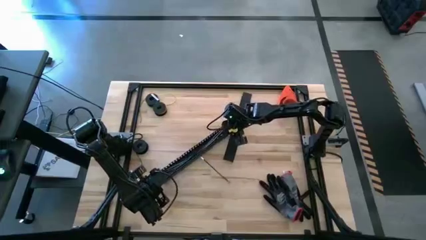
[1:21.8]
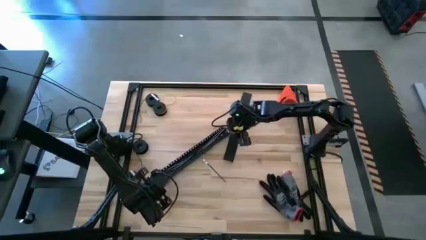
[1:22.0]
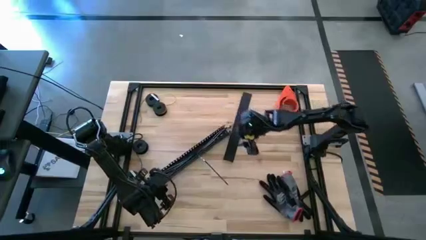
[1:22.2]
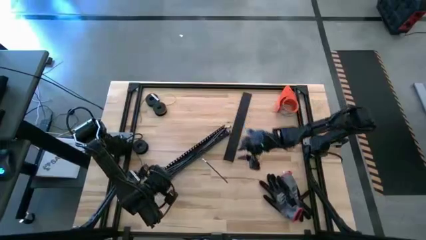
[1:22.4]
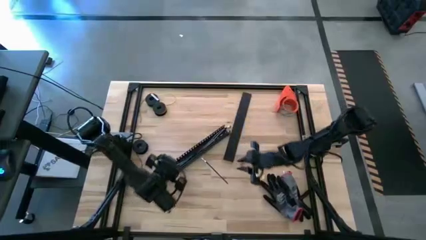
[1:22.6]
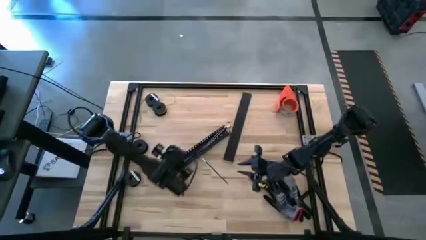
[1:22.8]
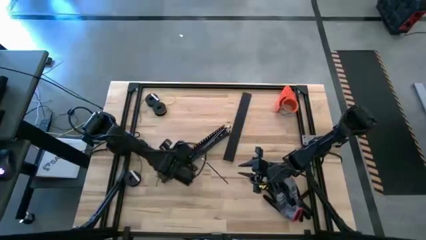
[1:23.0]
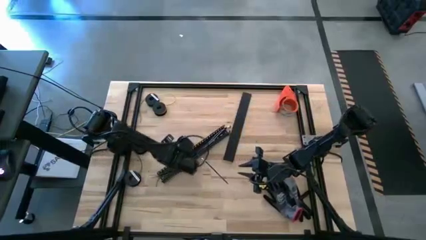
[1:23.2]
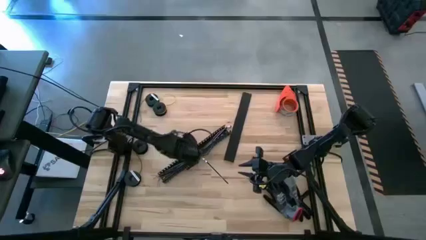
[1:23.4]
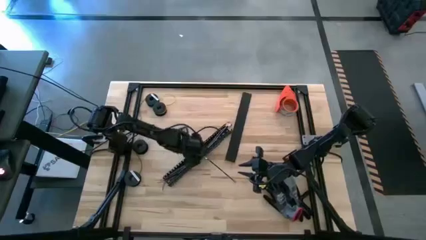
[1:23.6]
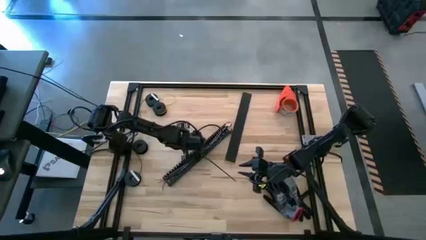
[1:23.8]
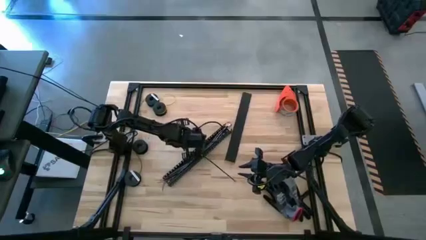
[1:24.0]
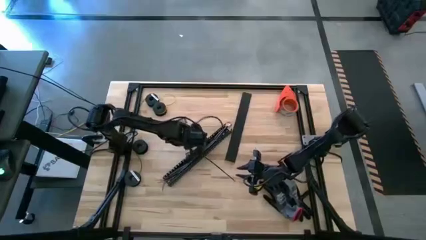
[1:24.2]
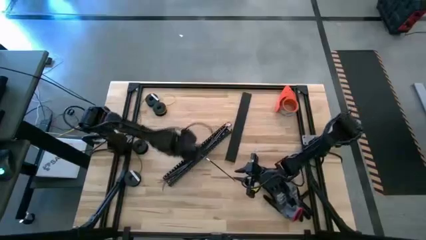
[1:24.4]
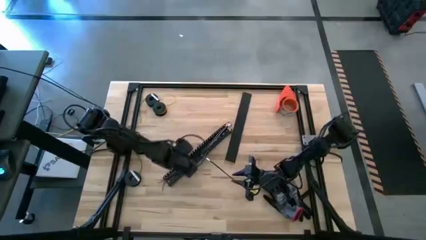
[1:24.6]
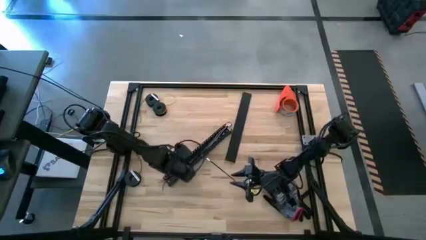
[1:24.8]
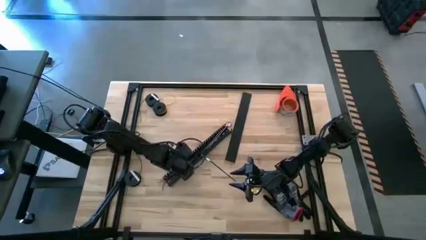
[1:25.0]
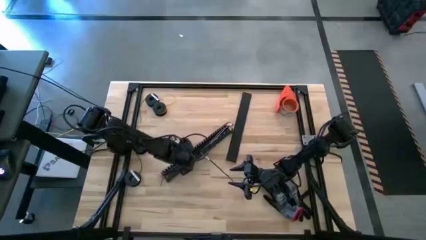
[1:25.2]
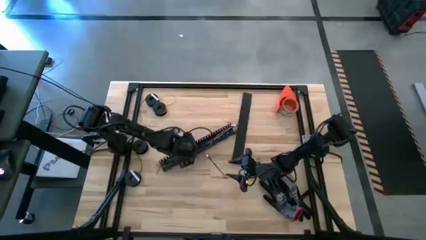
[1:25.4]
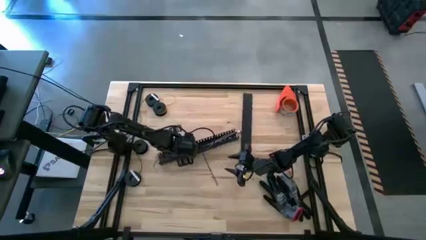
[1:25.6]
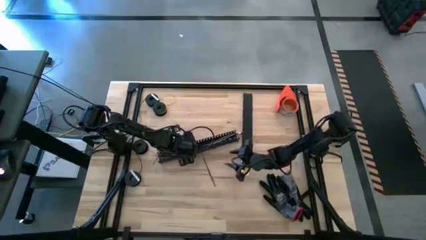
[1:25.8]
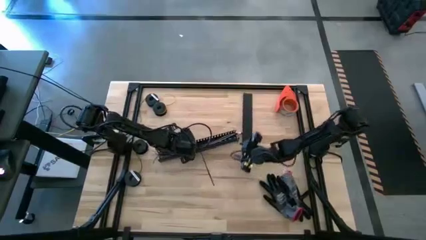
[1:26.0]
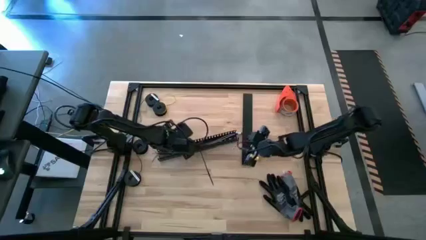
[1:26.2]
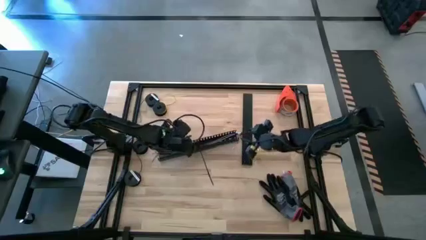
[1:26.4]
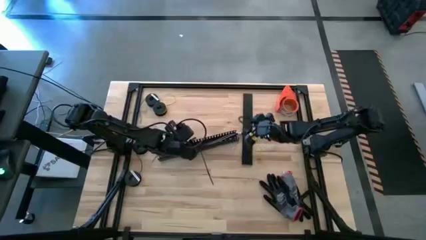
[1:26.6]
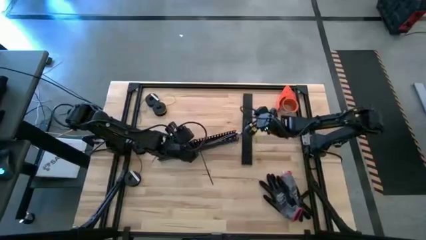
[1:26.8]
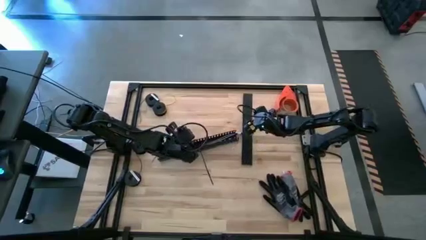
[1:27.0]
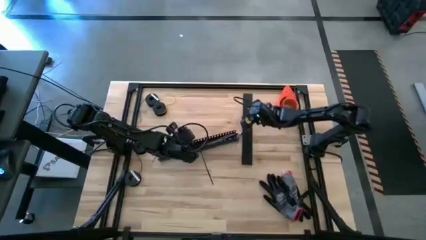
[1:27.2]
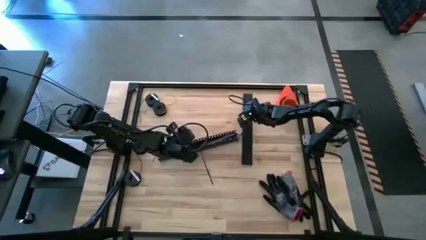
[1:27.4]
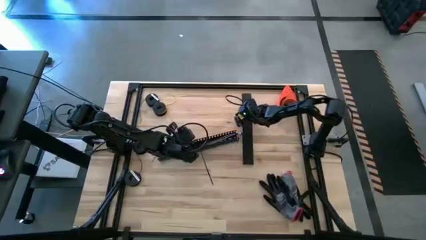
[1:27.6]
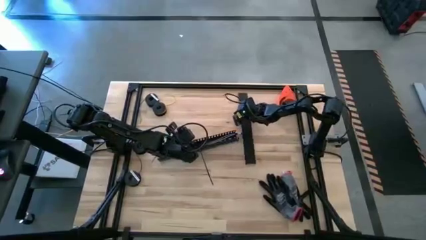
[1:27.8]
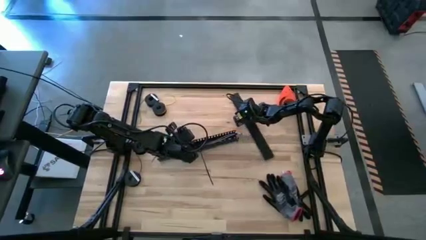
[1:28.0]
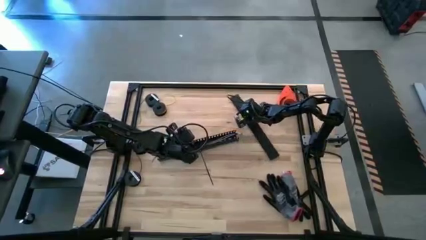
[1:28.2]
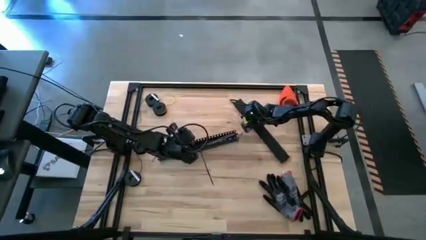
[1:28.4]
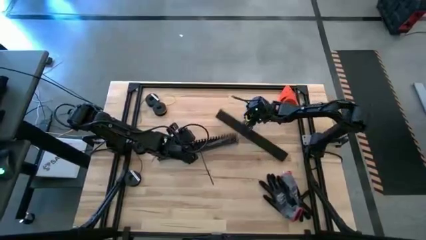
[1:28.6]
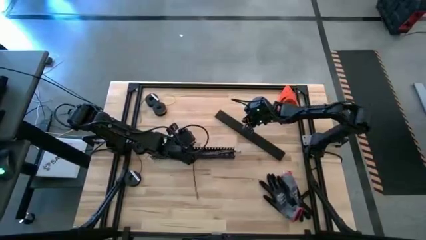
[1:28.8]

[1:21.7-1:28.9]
Task: Ziptie cables
Close the black cable duct

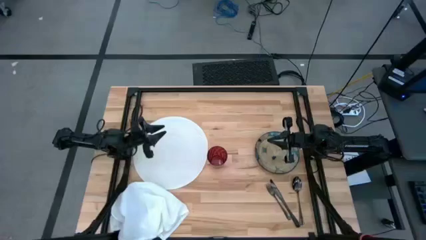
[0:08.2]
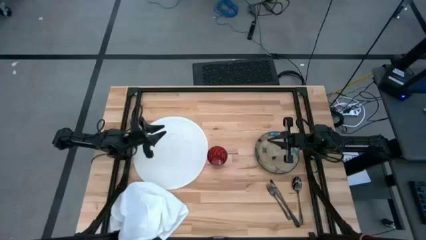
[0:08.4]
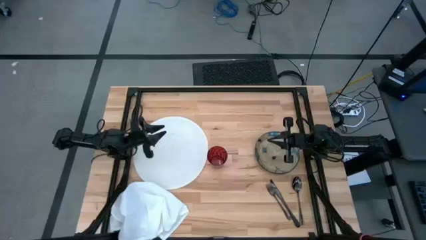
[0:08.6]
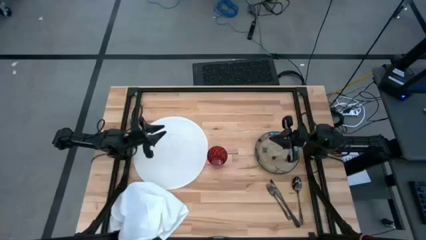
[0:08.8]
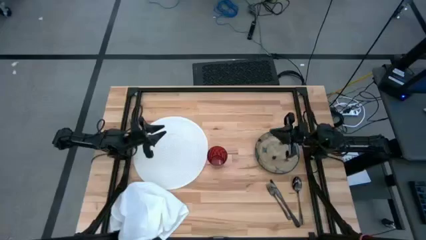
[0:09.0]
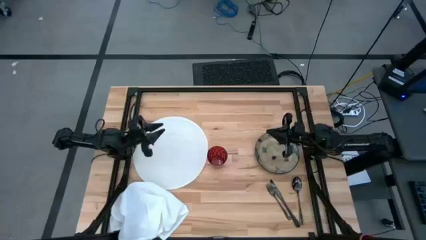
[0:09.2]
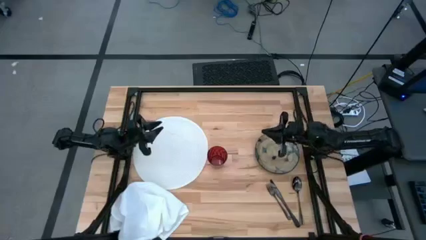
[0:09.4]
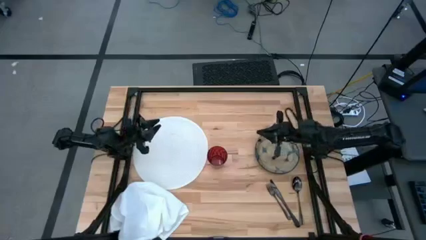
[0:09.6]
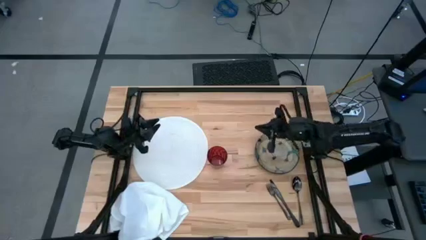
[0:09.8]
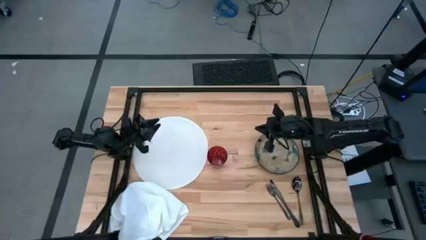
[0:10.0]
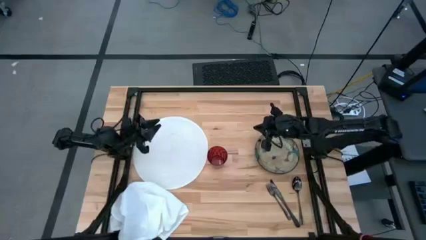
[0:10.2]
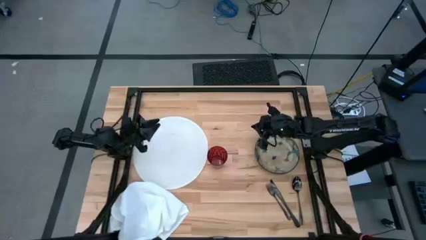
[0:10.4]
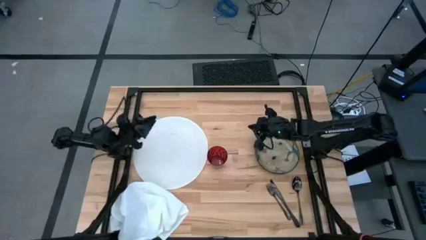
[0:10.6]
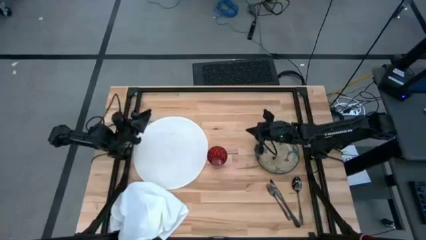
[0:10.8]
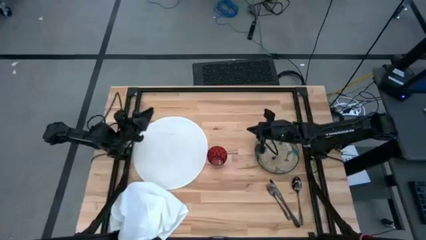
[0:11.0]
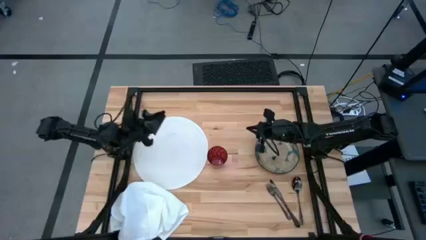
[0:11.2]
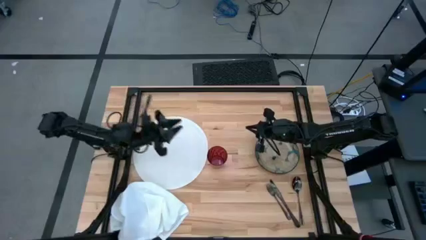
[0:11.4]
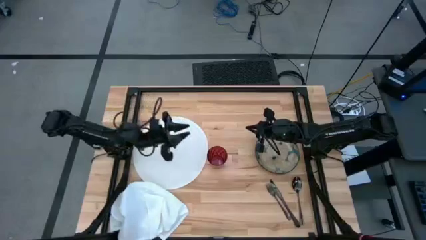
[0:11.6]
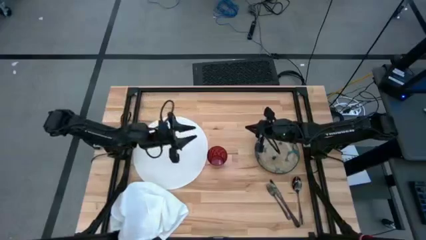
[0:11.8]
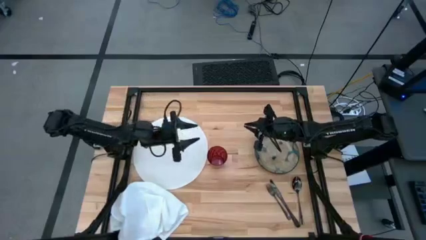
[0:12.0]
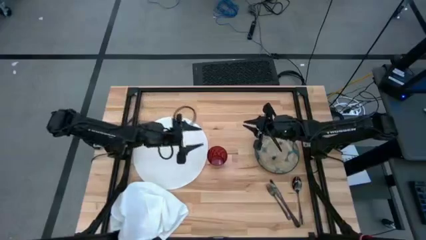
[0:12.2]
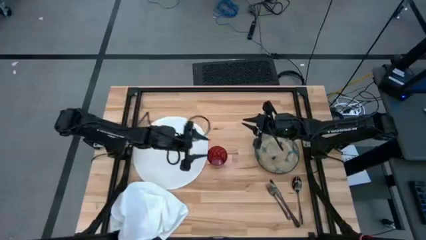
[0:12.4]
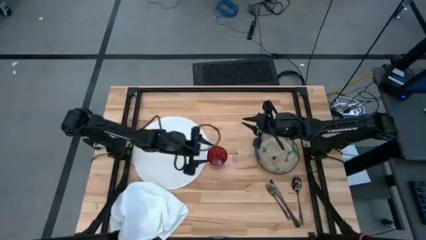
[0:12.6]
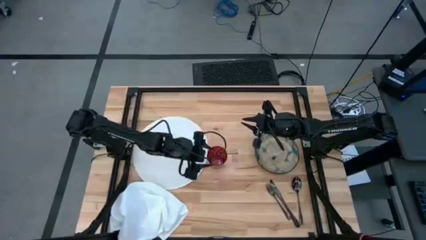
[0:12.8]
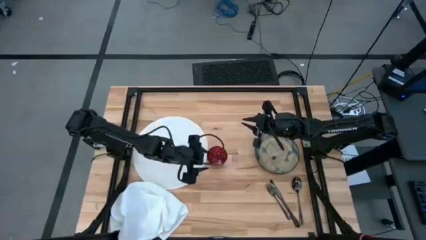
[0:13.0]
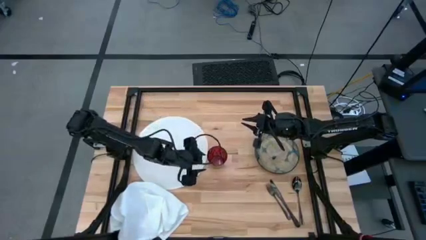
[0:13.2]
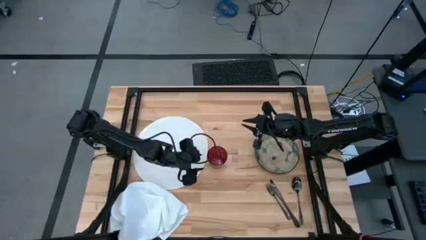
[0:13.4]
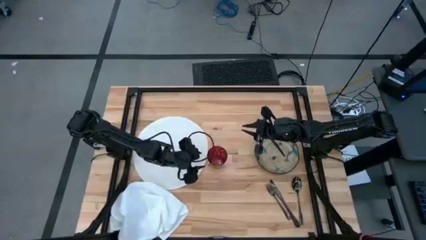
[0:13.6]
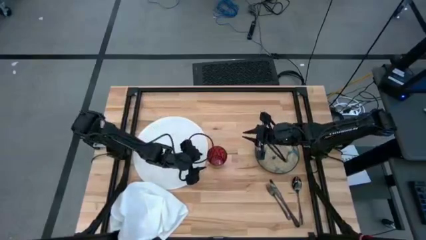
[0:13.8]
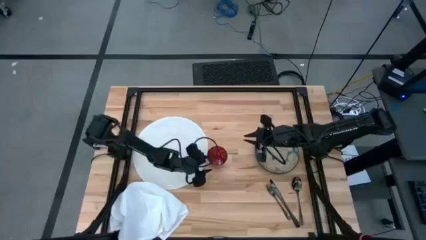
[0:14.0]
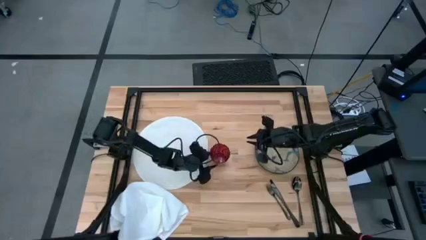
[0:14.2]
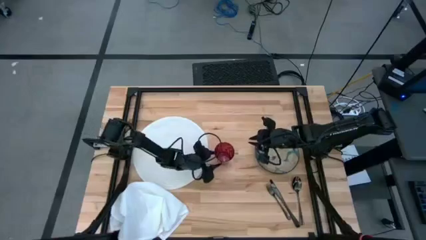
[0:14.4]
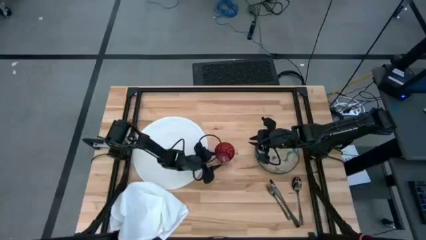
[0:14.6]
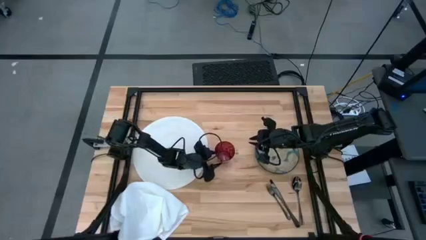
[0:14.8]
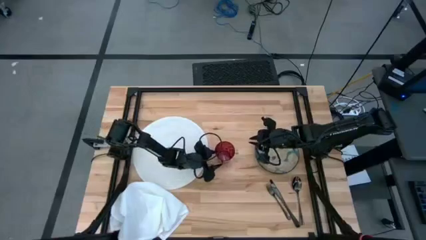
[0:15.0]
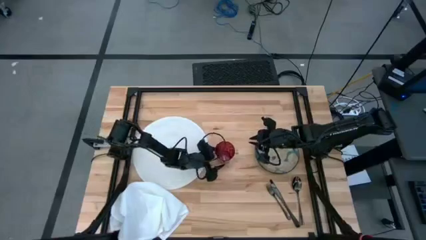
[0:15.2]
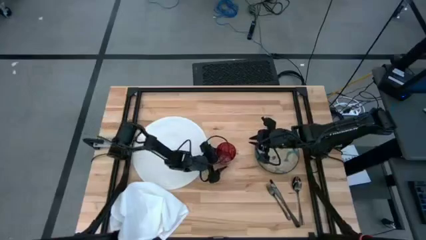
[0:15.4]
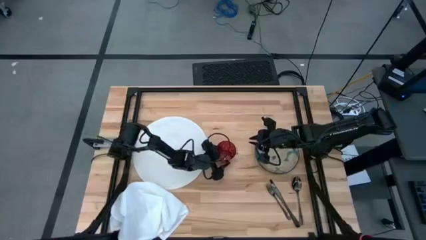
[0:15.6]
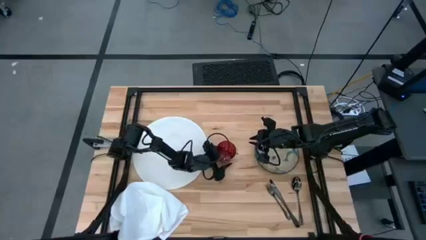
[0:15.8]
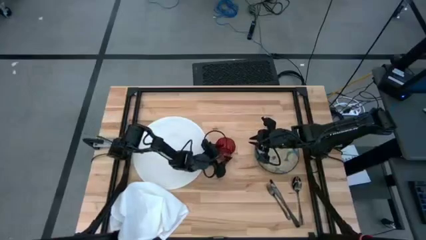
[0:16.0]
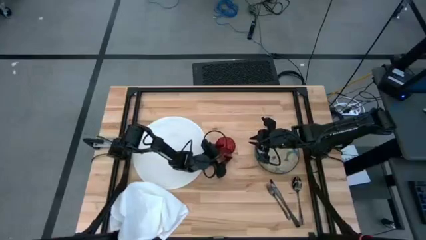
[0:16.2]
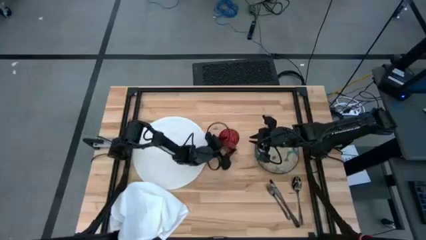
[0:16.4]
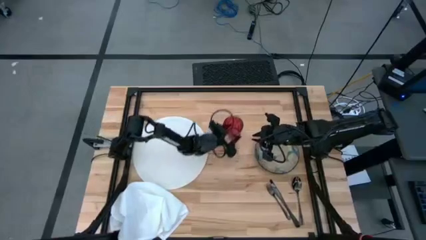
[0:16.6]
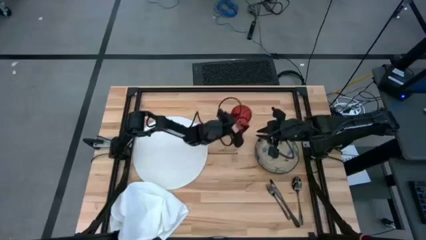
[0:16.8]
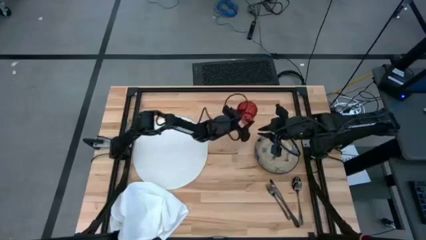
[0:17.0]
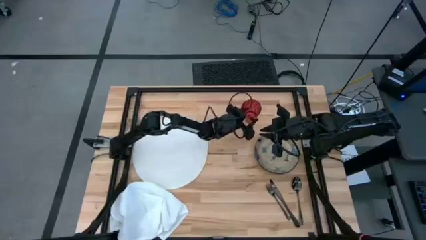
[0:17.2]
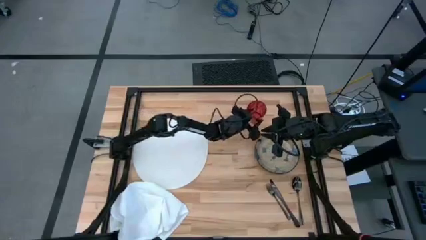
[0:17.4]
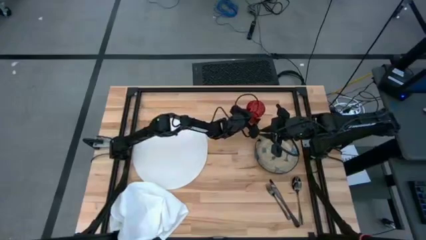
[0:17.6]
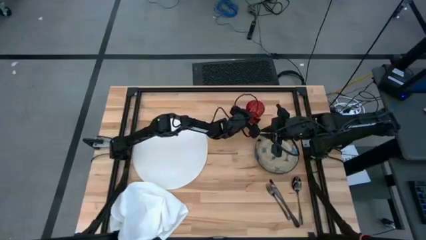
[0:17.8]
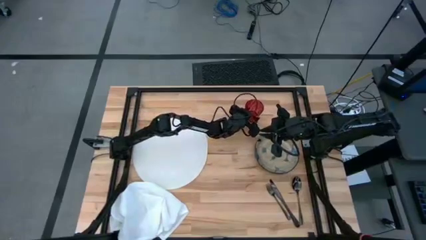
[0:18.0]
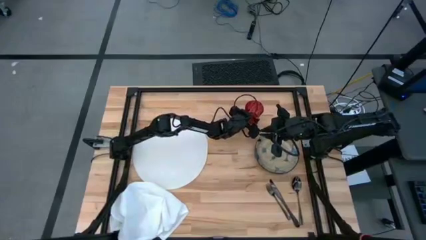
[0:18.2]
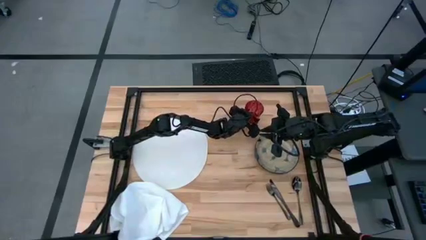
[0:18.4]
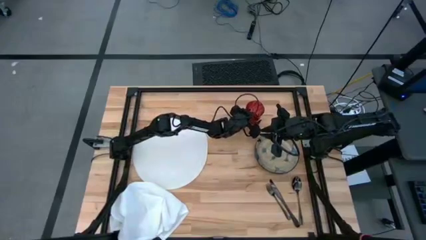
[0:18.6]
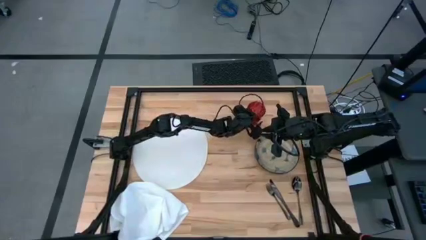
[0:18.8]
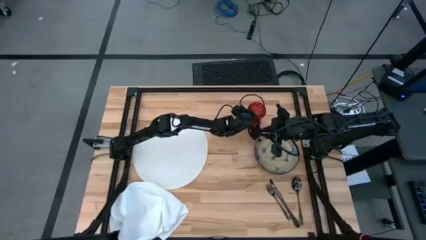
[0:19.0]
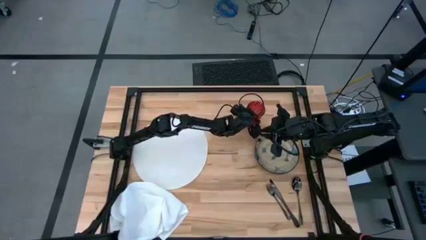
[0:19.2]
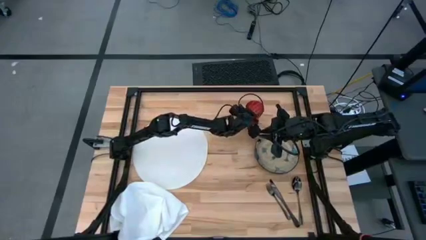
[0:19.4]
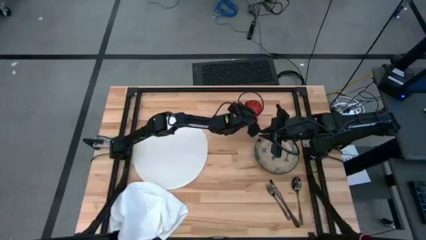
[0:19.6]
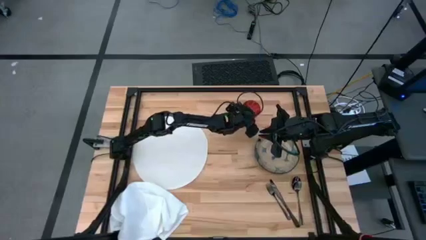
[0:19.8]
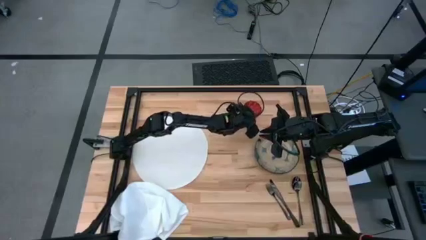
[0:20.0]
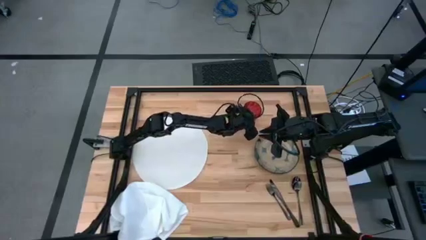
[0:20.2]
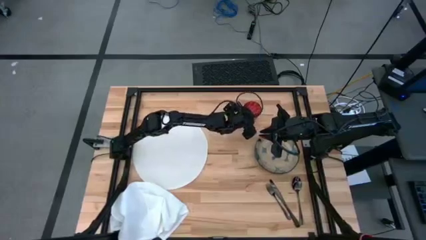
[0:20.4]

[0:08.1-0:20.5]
Task: Set table place
Move the red glass to the top right of the table
